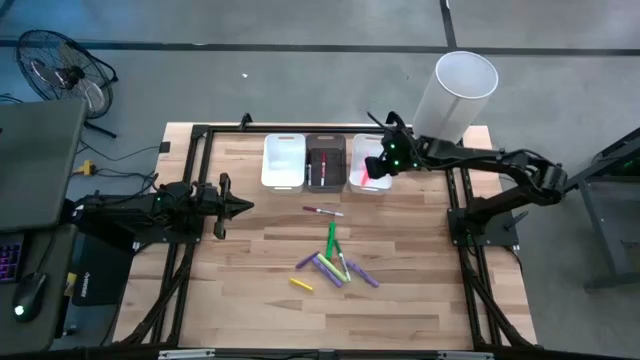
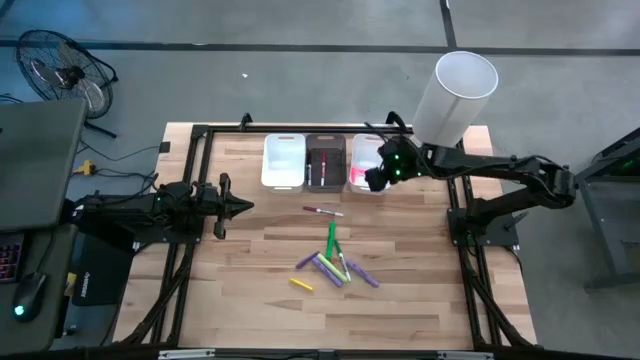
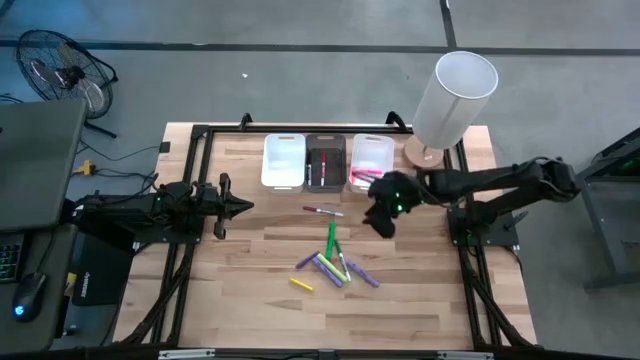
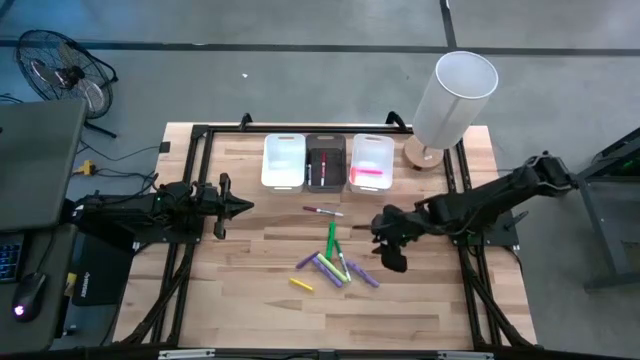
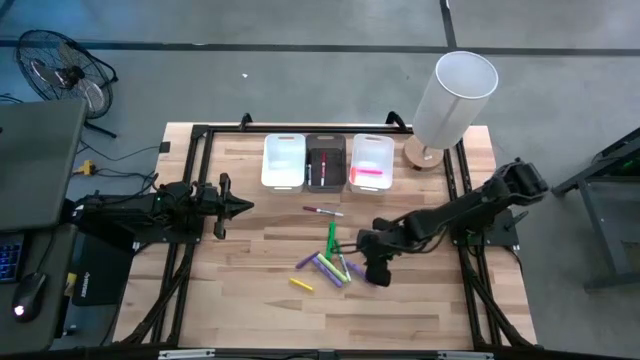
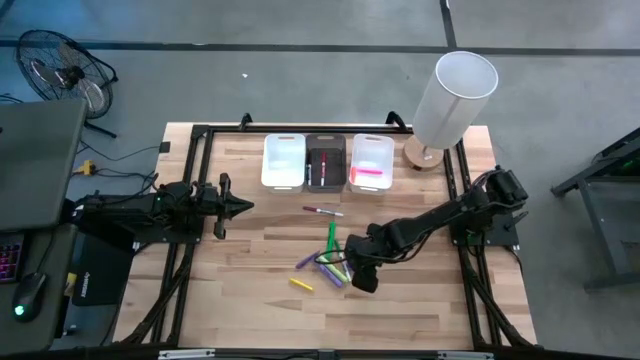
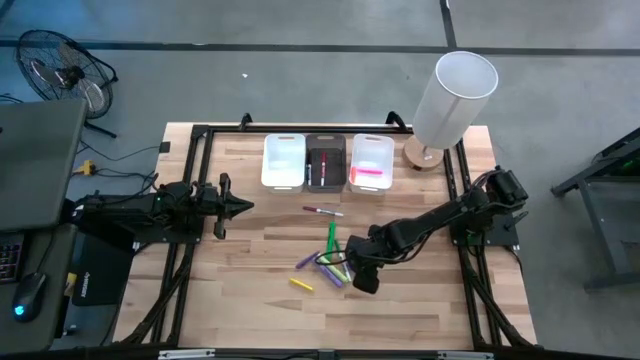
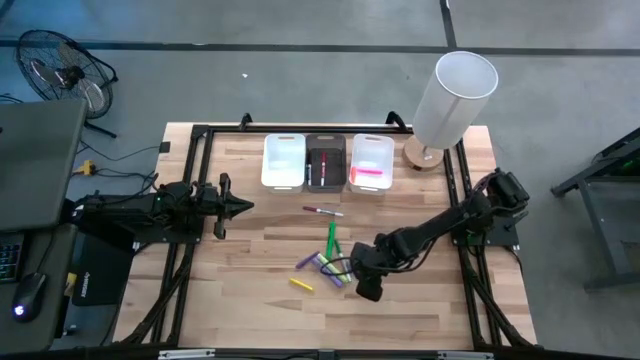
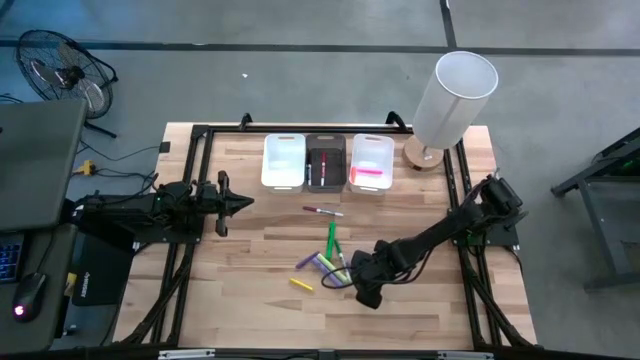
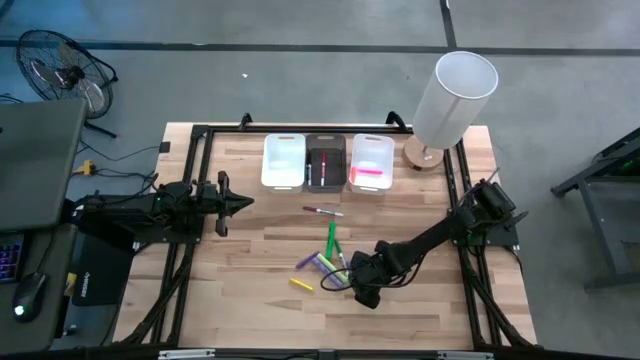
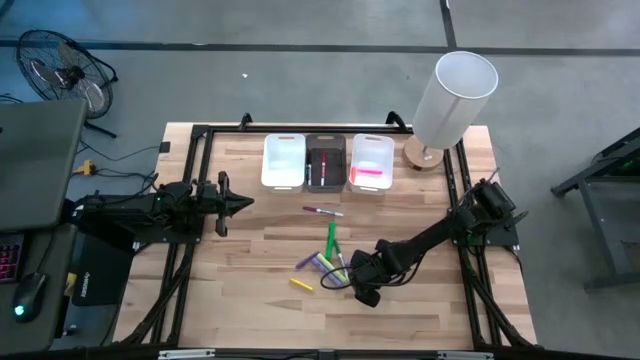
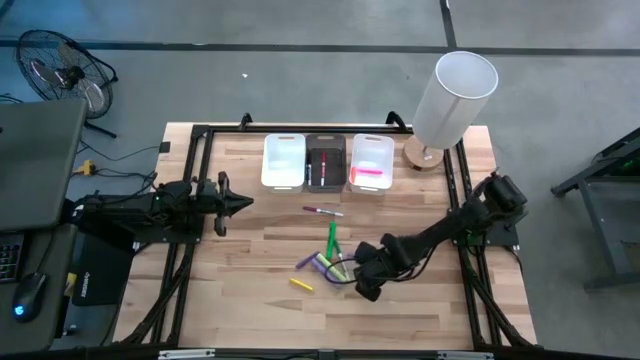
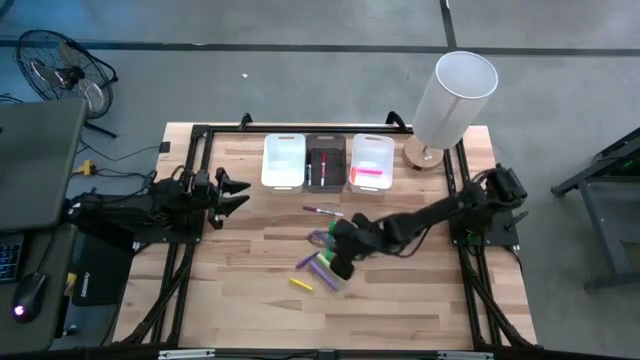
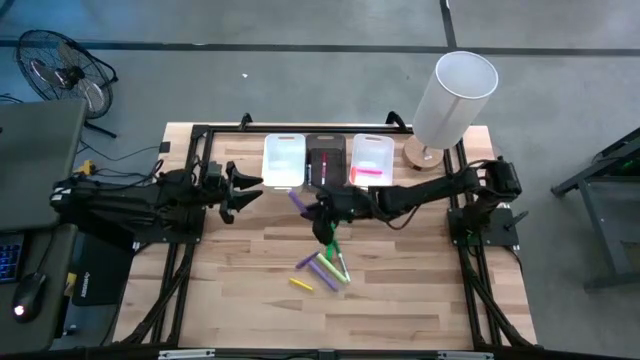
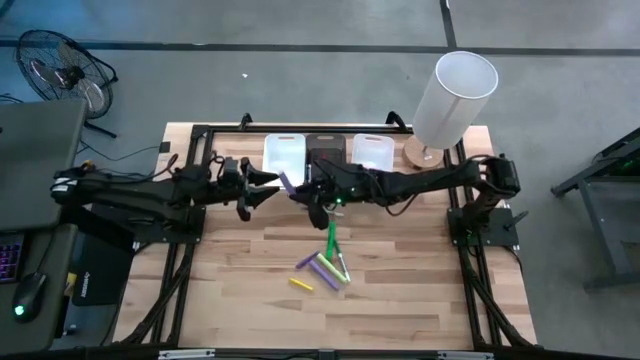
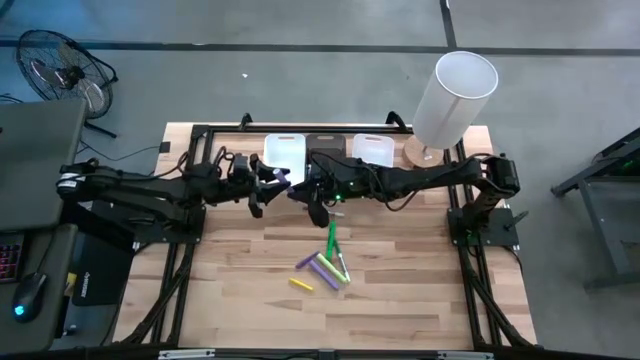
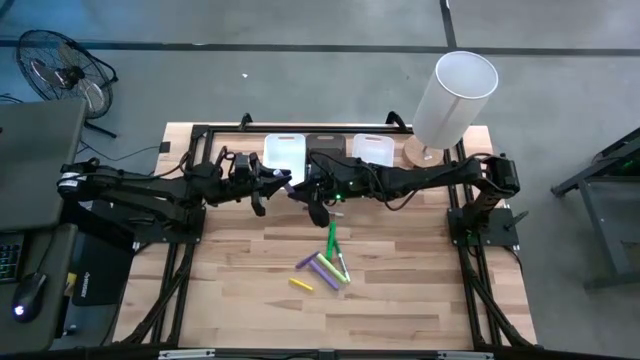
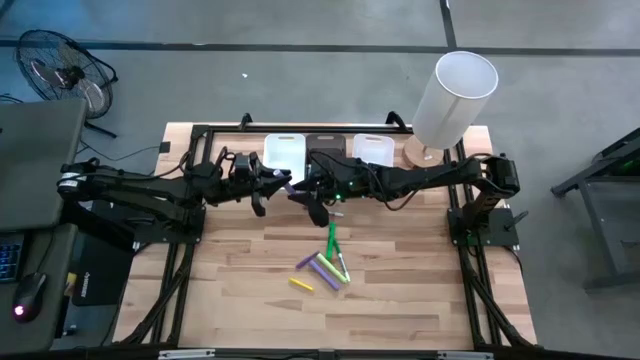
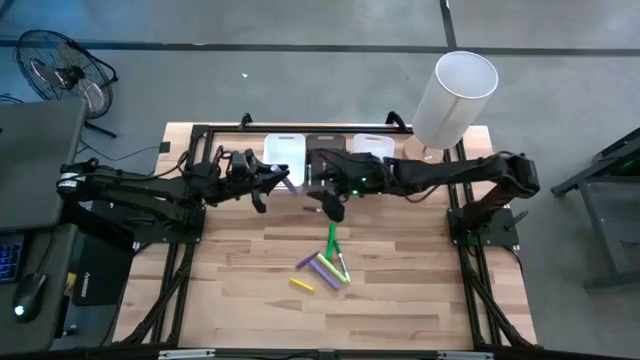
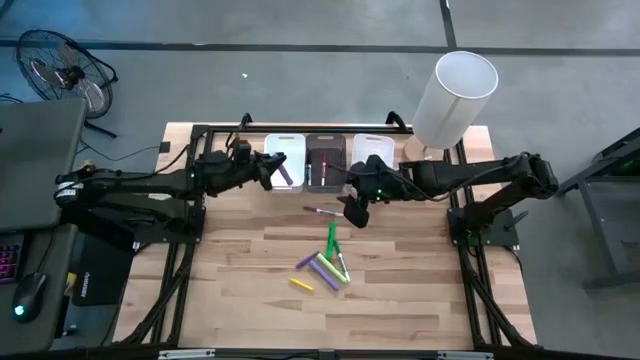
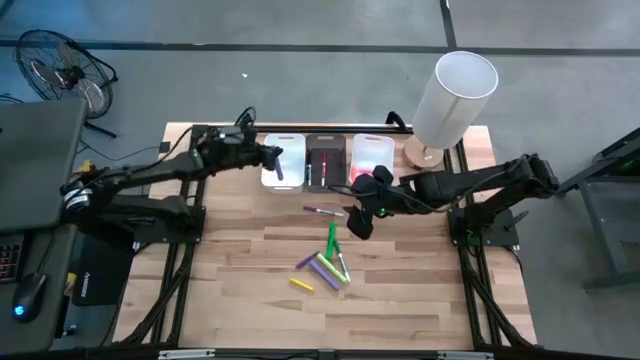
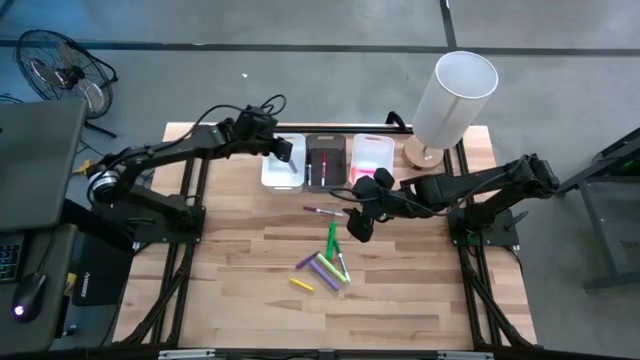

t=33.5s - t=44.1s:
Task: Pick & Place Markers
Put the right purple highlighter pen into the left white bin

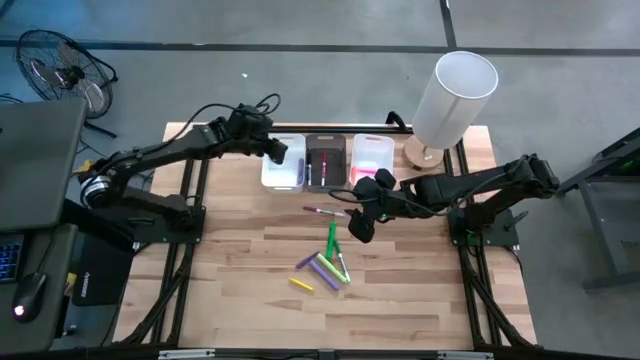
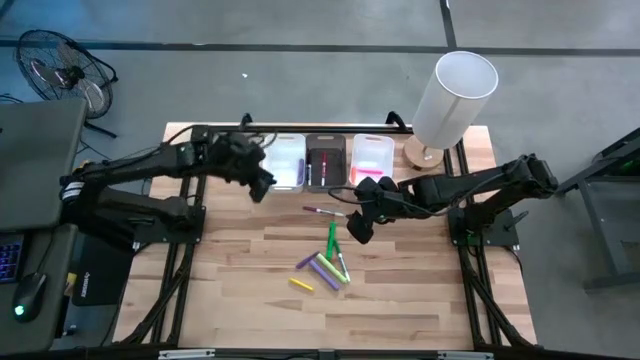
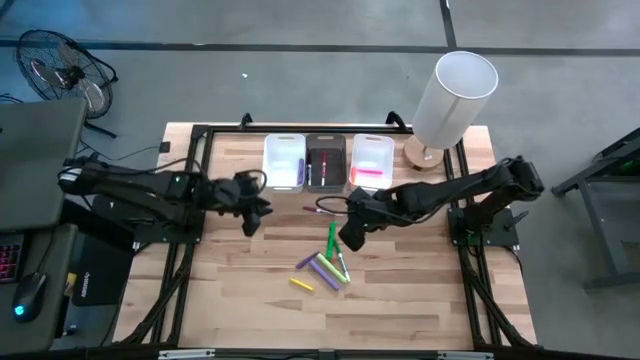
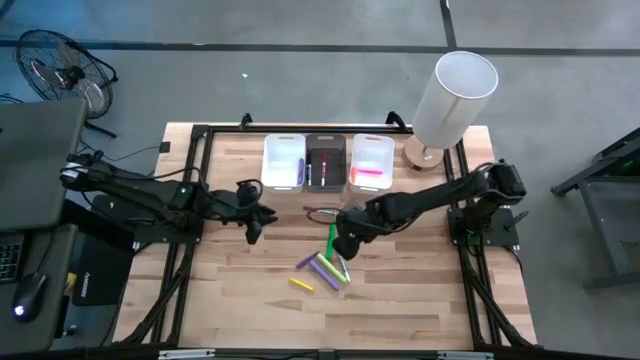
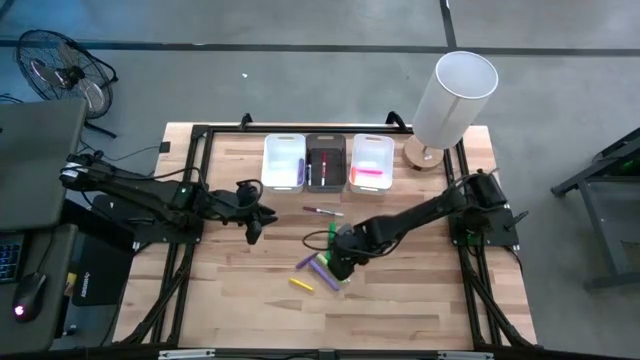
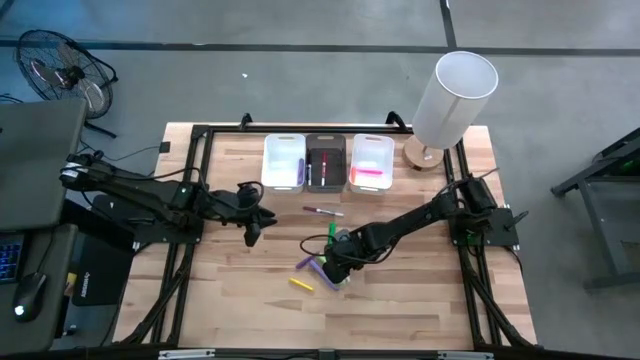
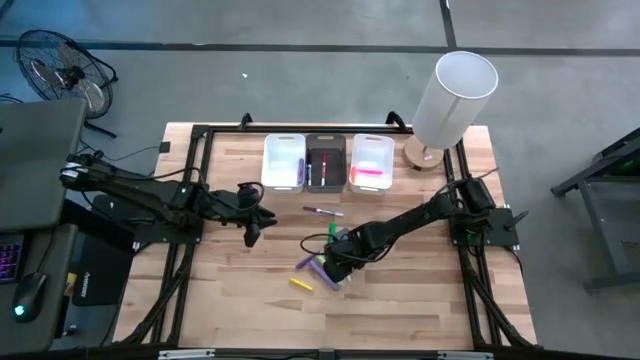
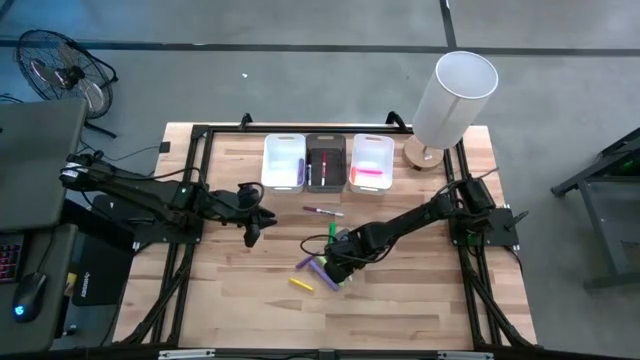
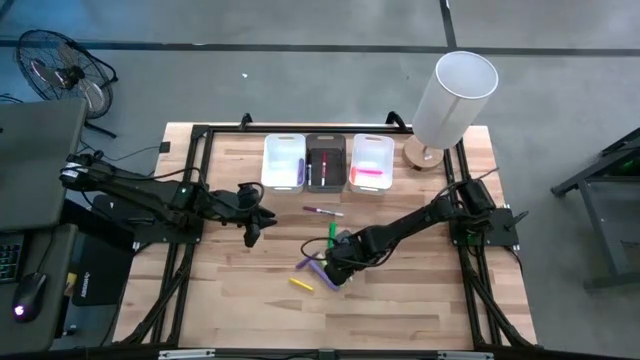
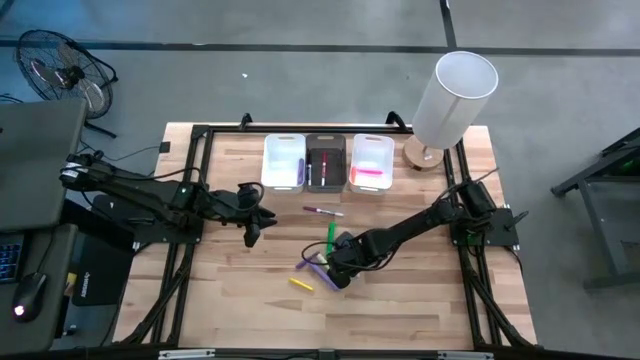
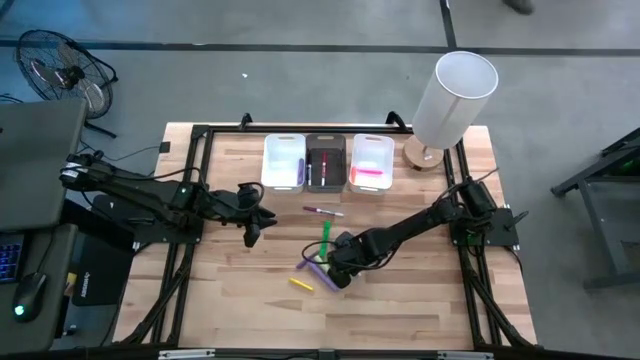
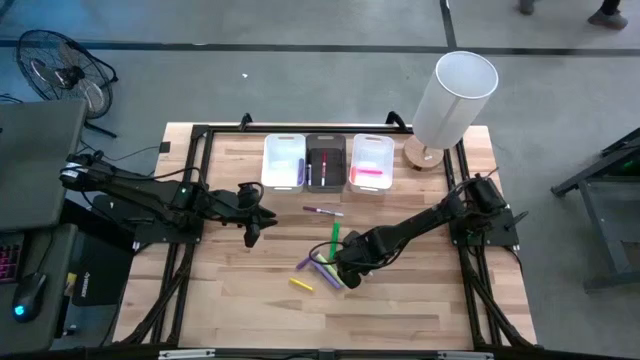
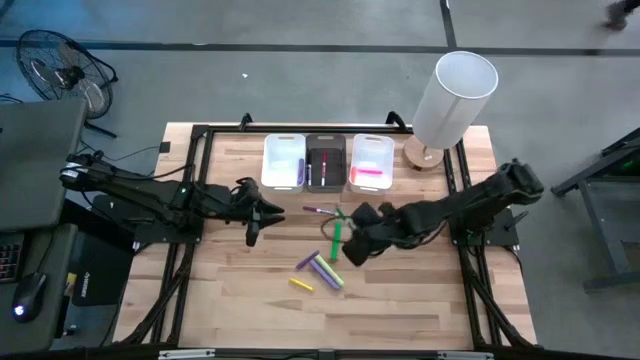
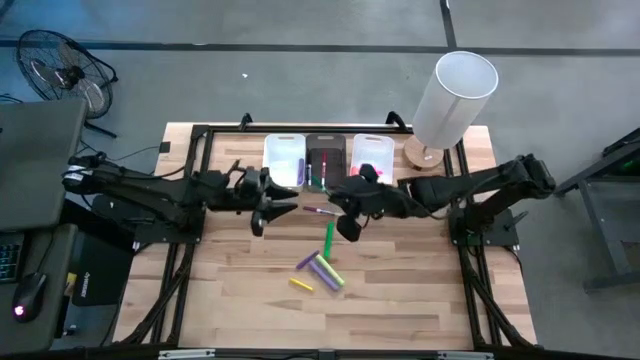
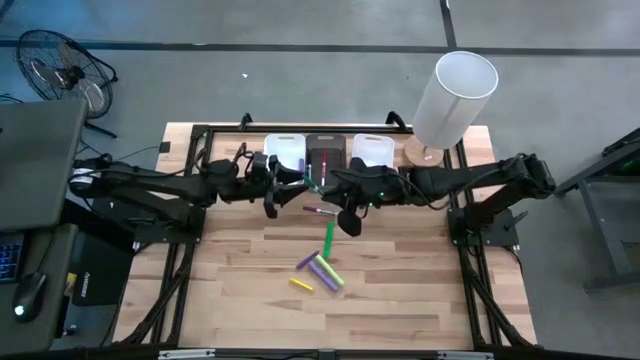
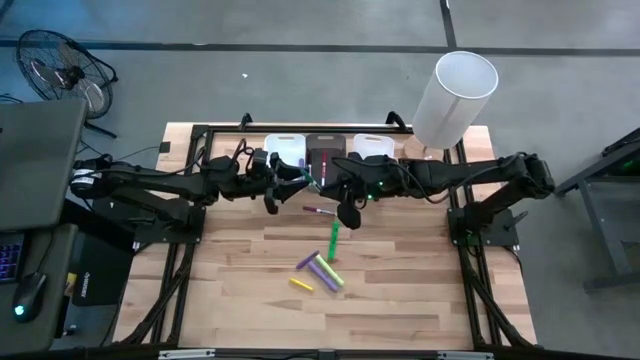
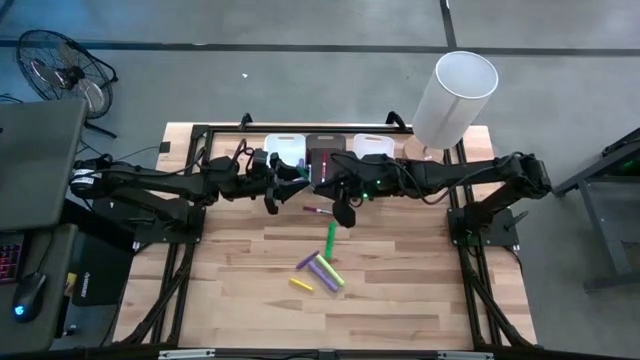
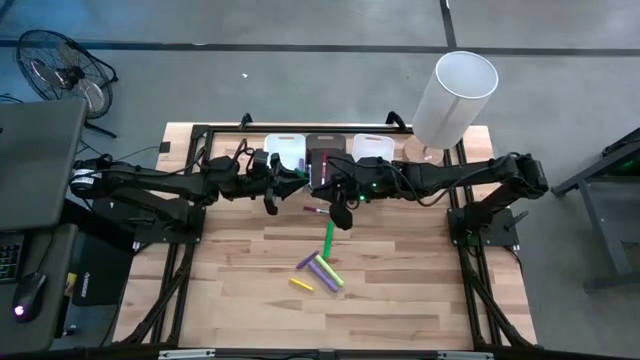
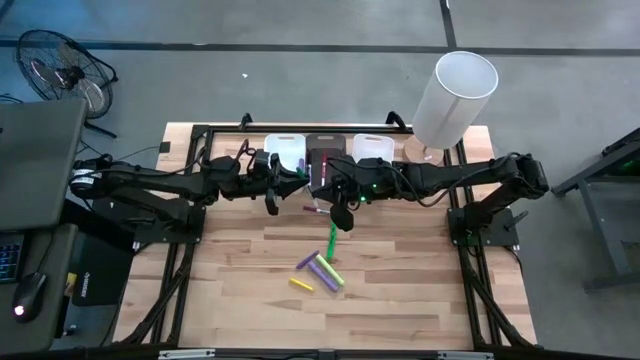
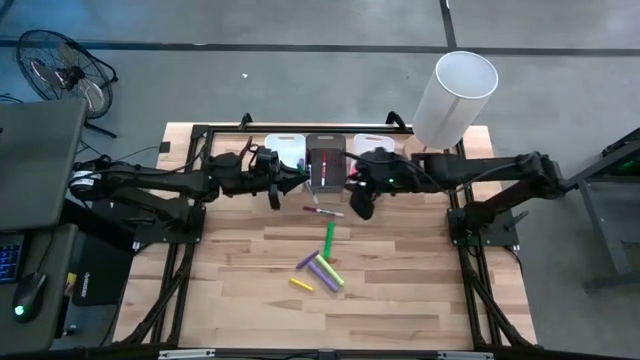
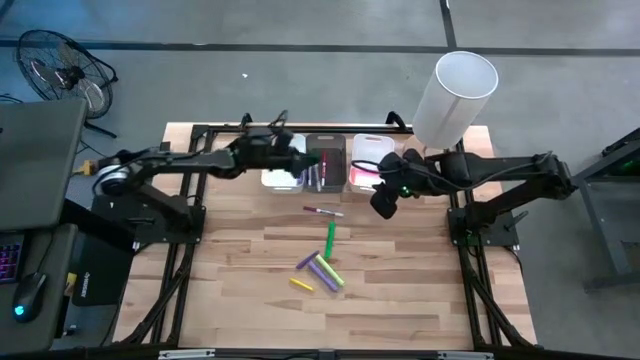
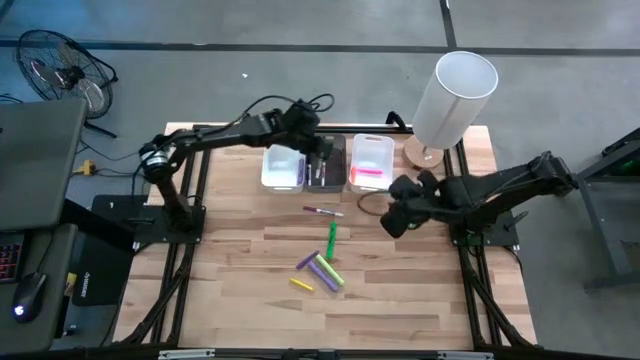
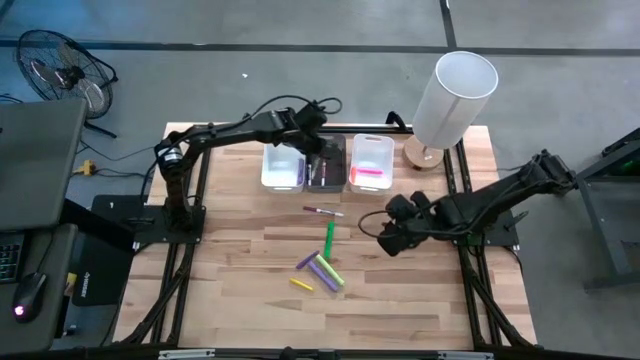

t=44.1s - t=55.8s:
Put the green marker pen into the black bin
